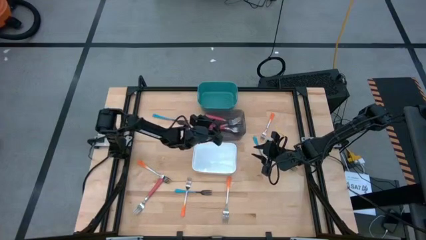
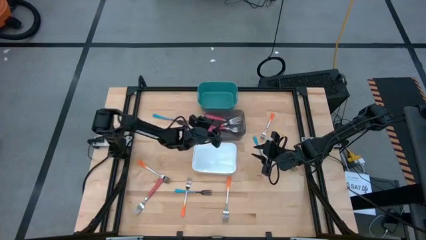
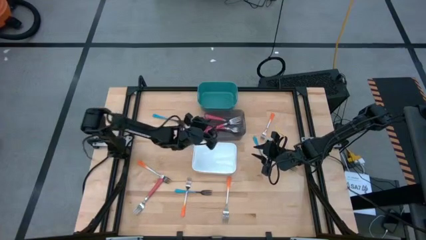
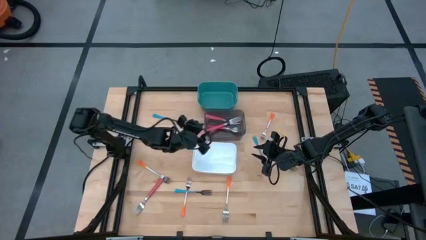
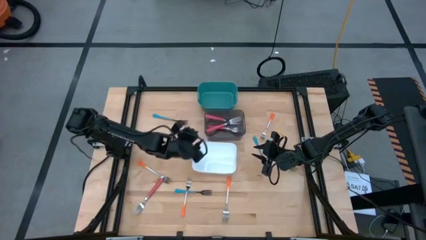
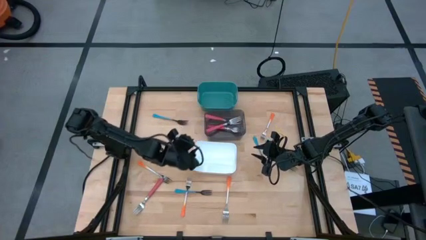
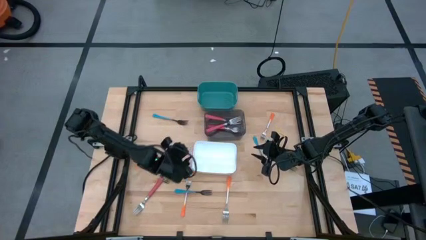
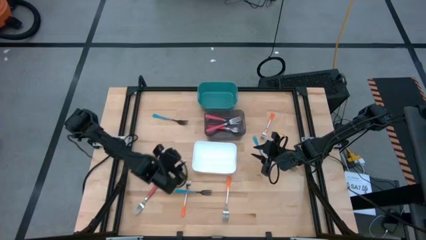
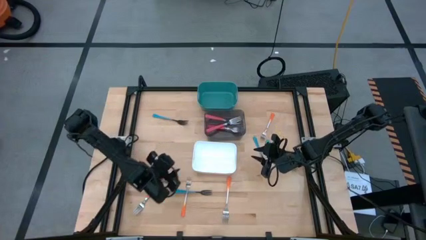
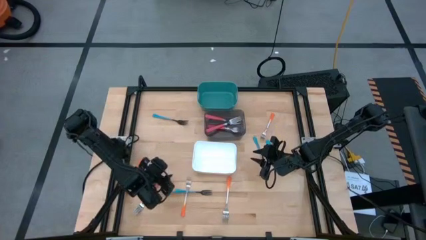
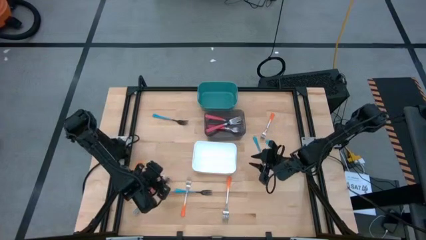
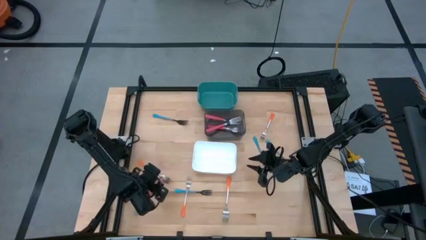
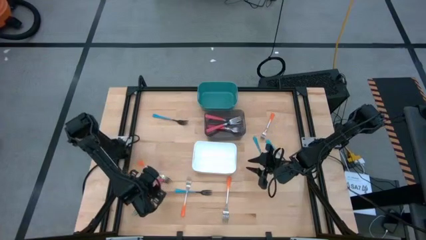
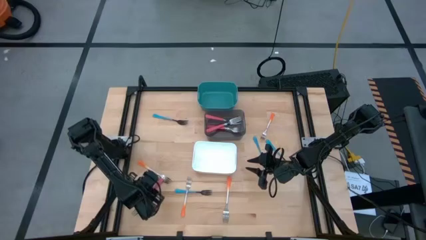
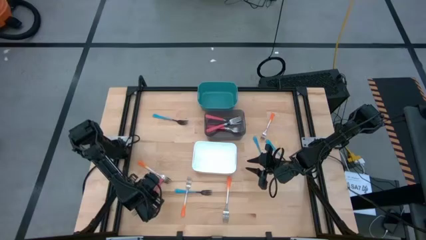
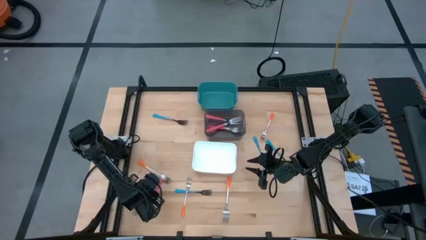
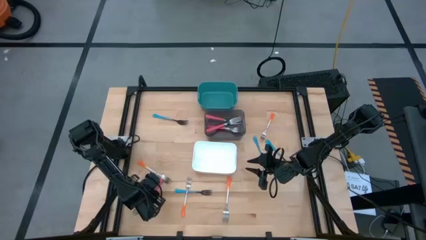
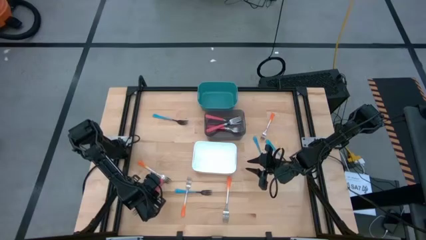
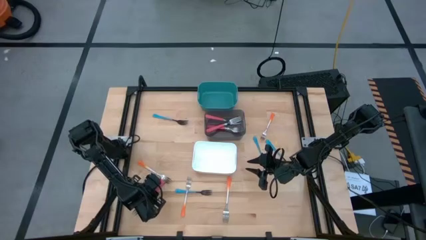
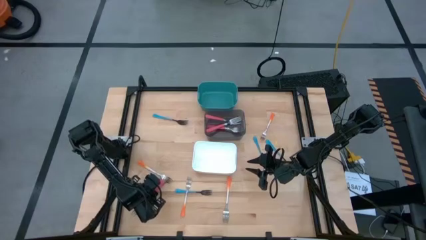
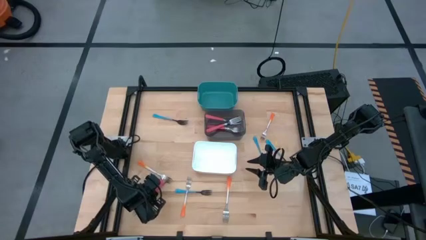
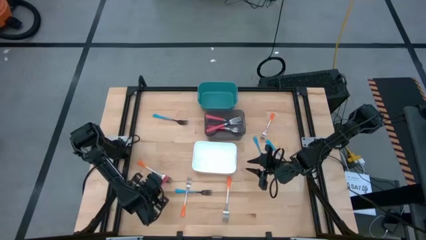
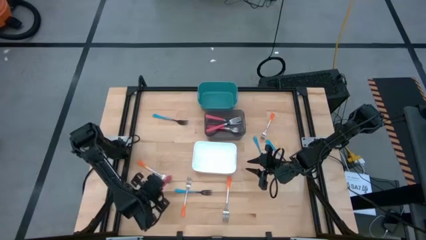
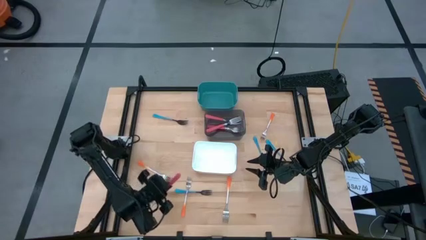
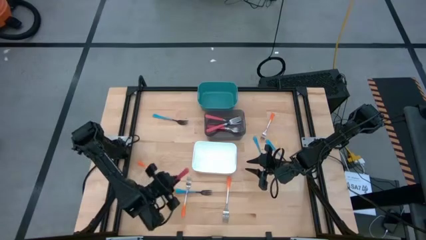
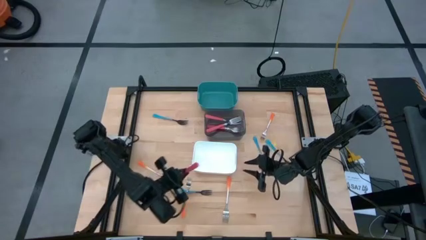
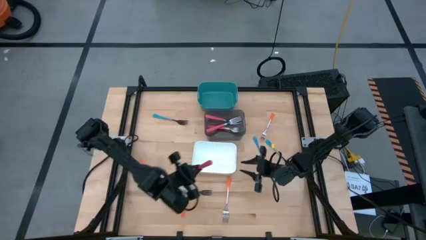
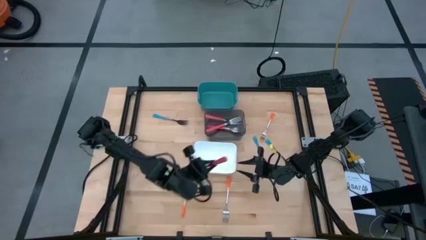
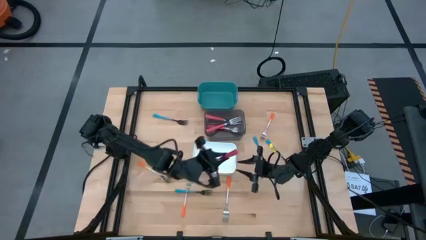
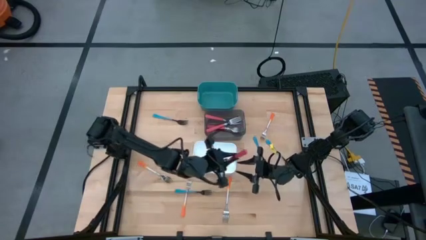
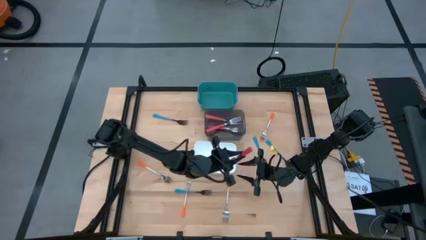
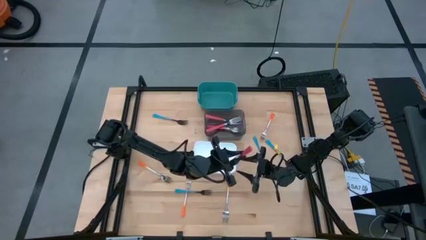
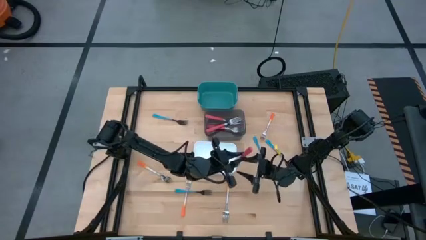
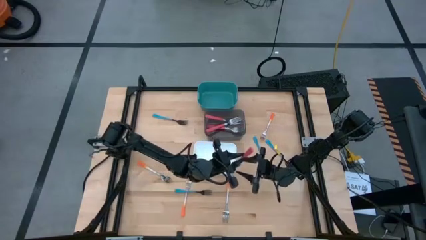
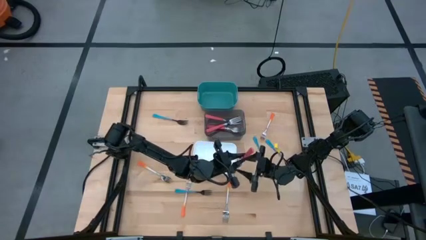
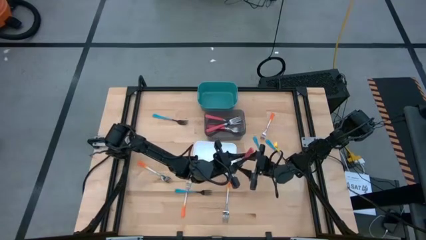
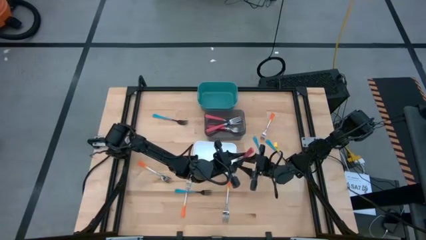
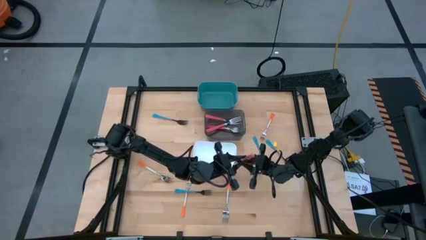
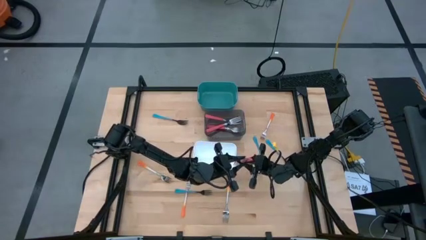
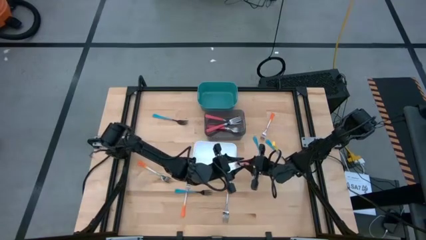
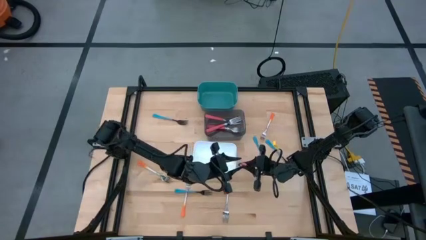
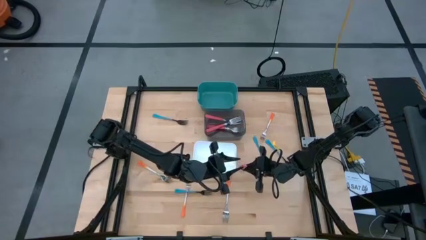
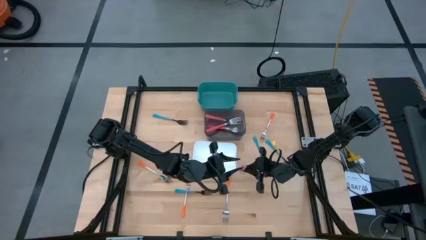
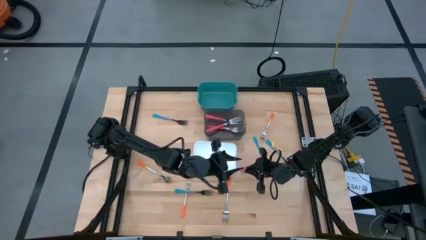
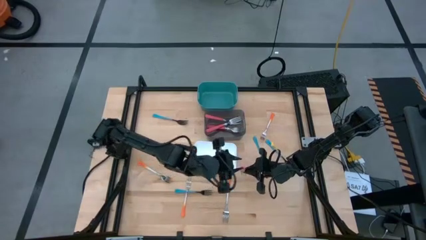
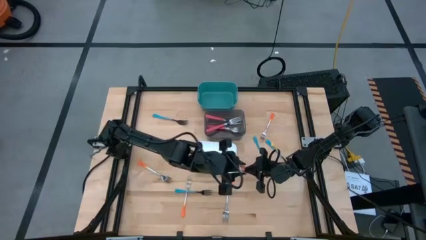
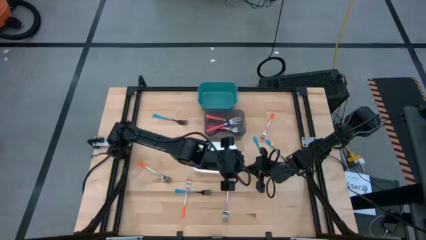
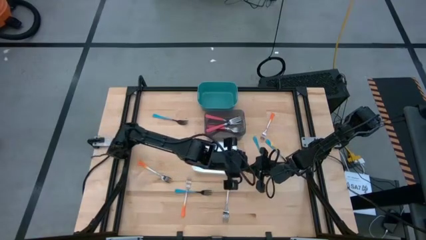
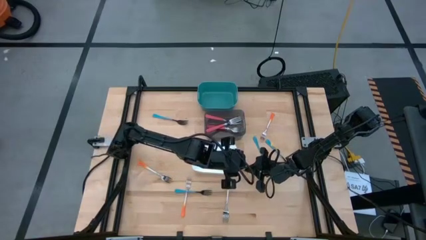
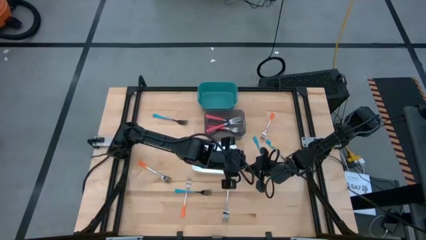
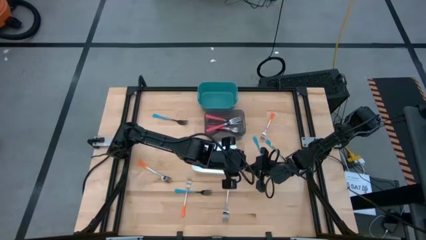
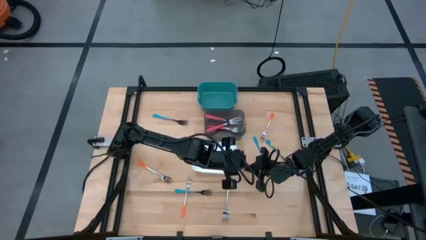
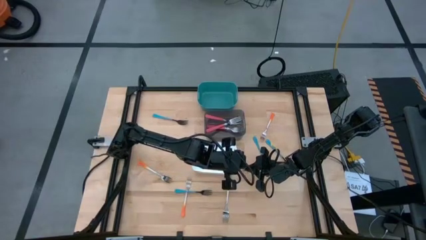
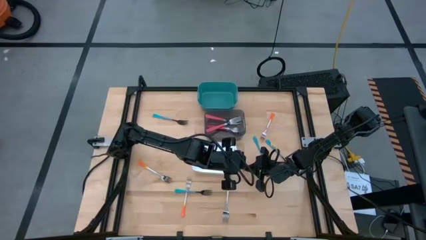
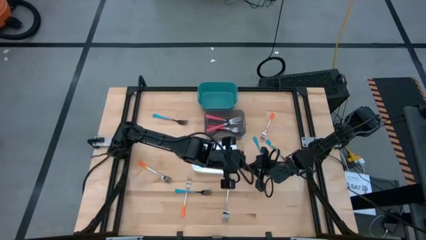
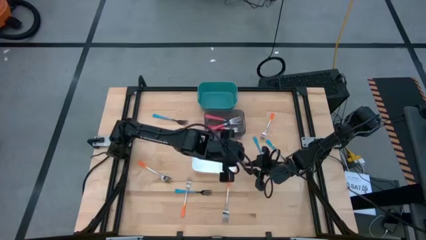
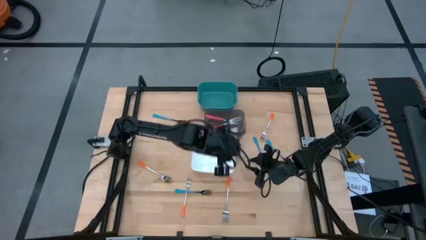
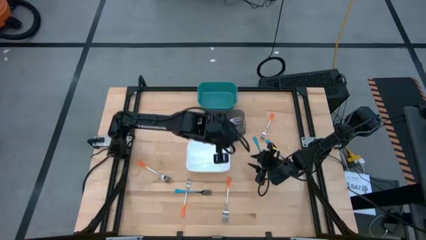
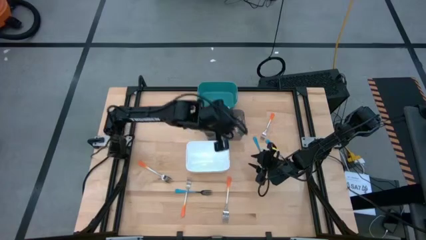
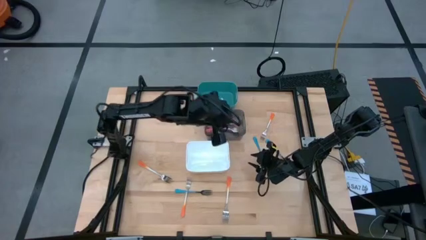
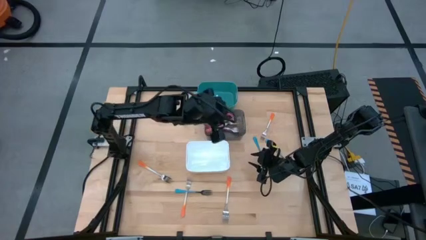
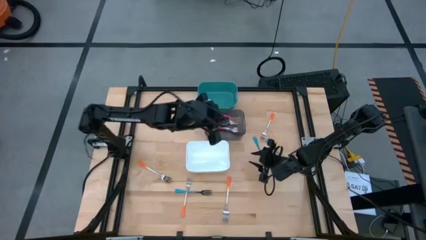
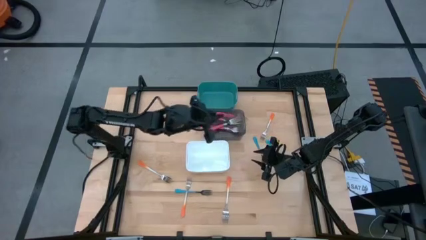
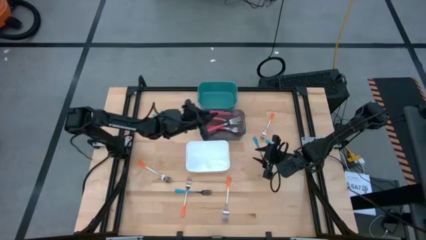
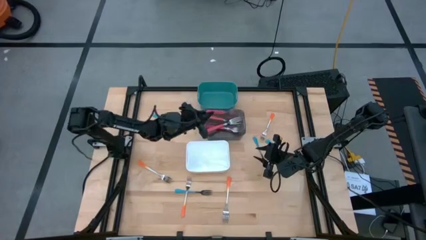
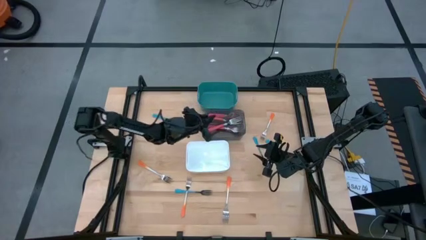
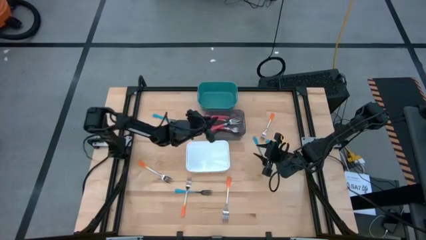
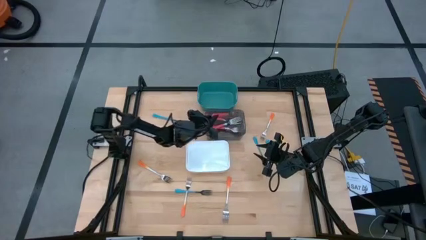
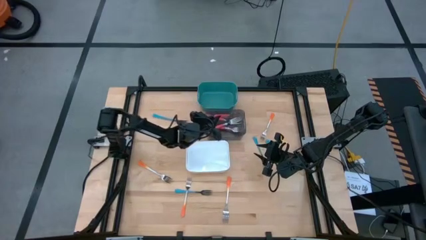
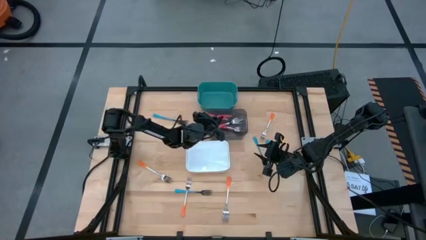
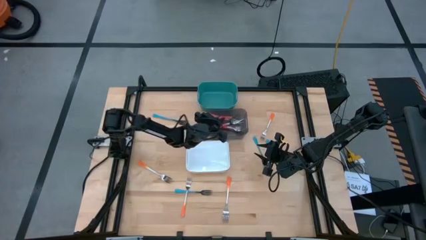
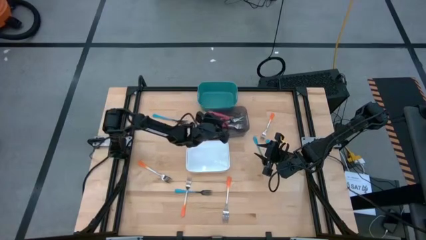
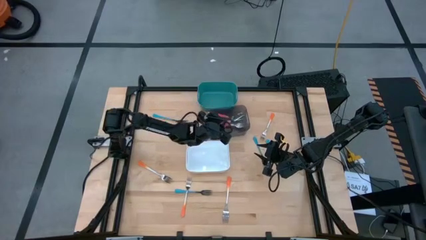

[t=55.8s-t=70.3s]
Task: Sort silverware by color (type)
Put the pink fork into the black bin

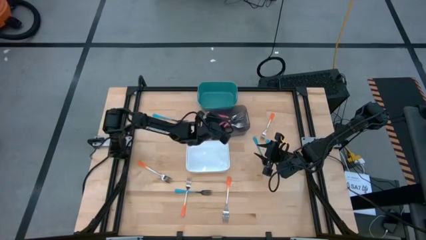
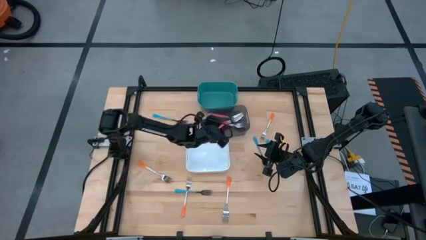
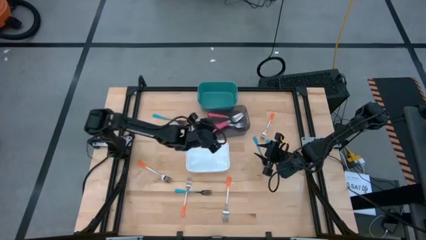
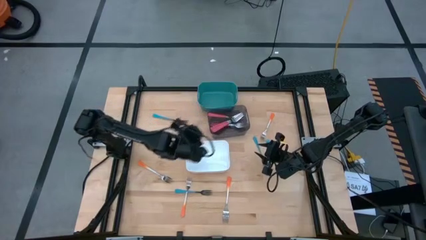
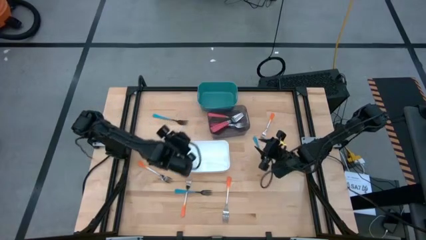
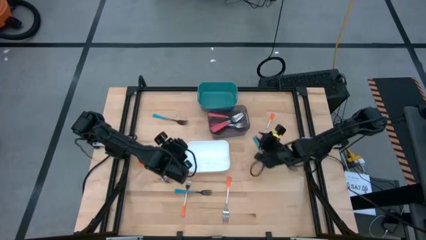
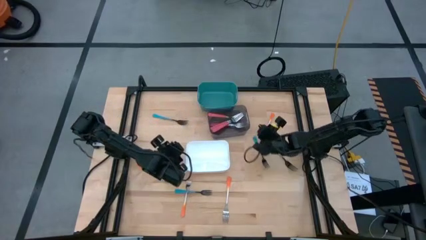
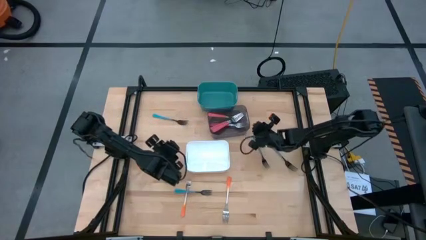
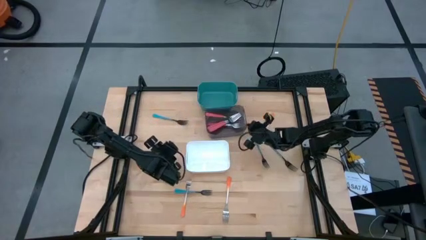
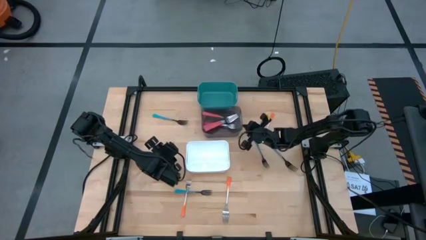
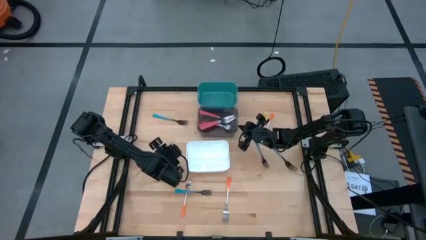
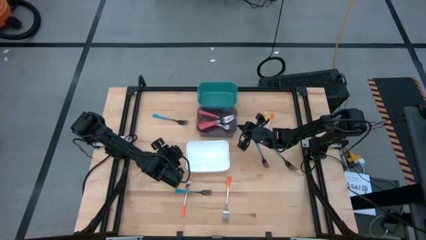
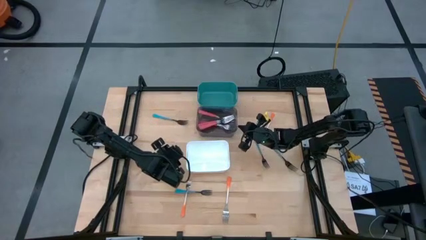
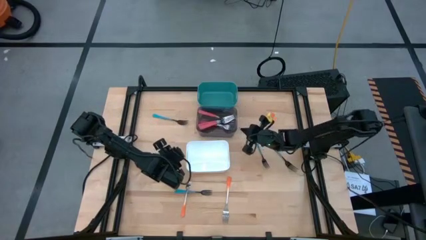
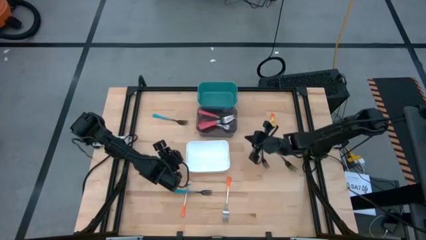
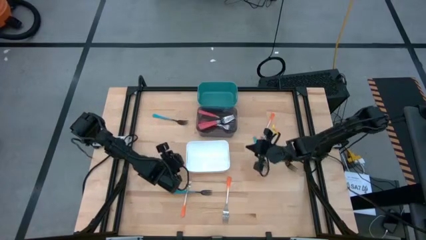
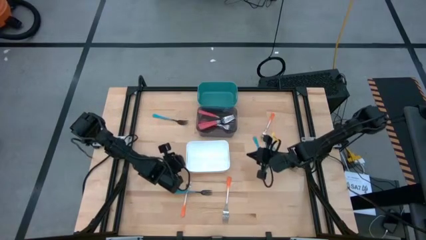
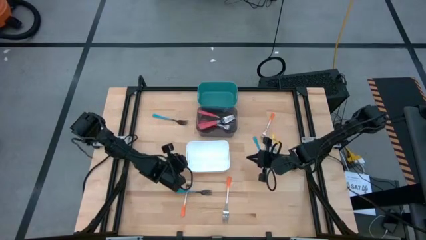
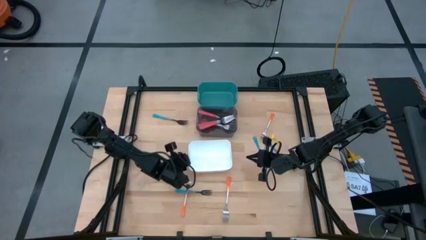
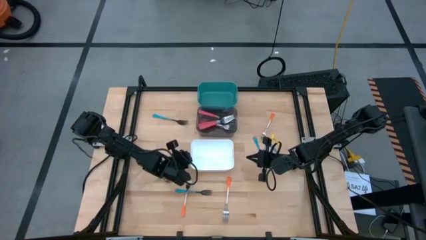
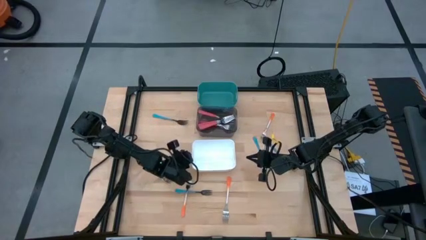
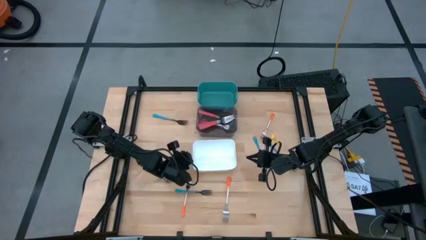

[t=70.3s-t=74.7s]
Adjust the bins
